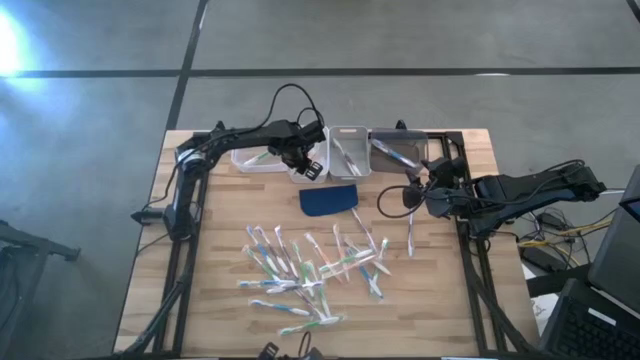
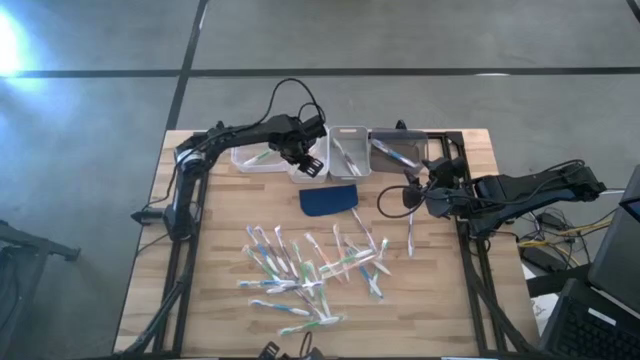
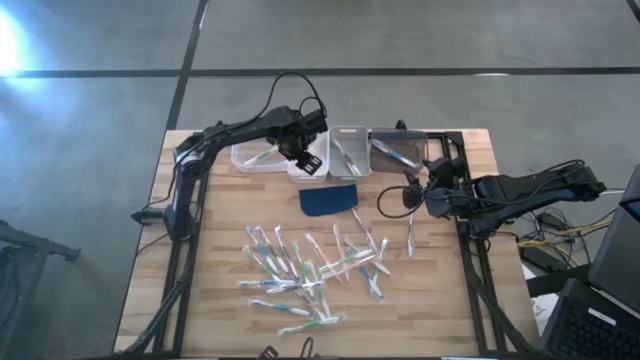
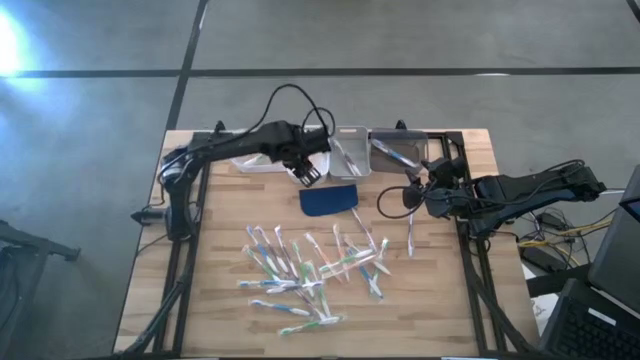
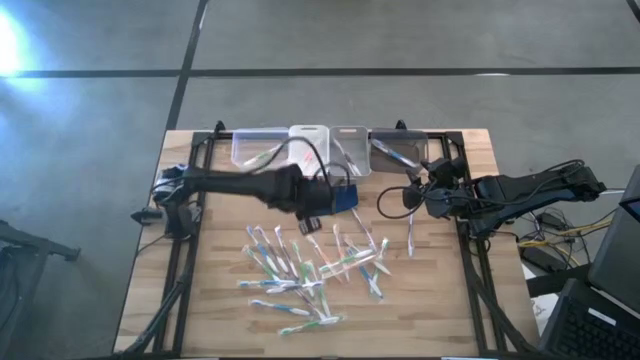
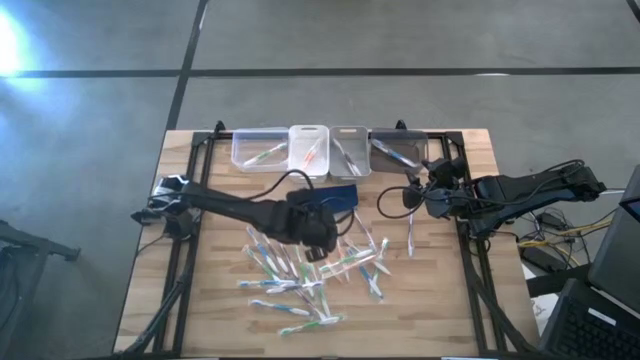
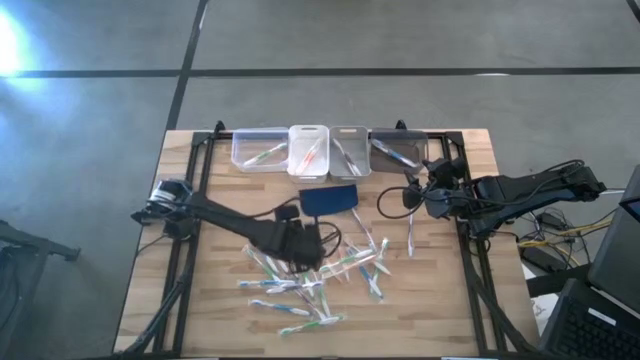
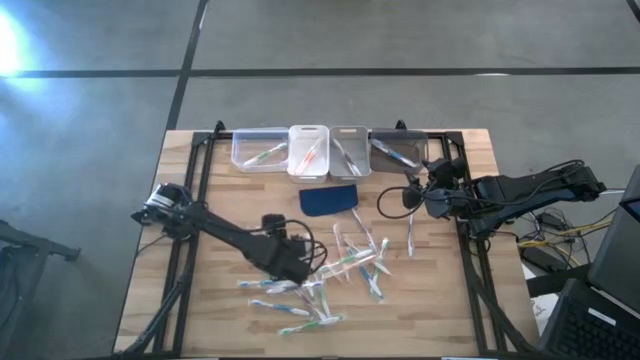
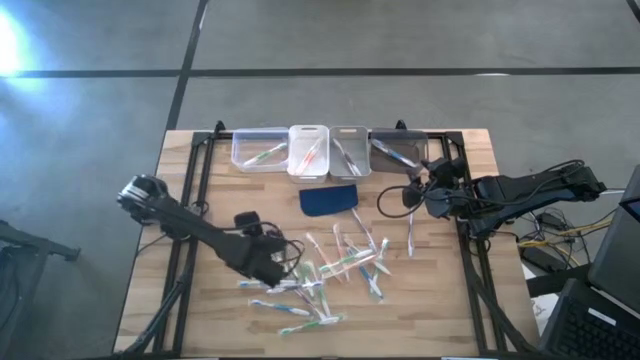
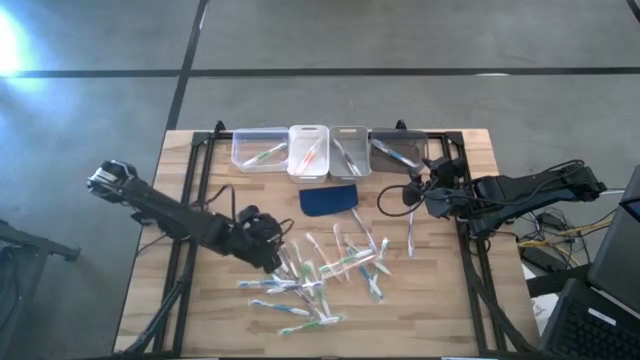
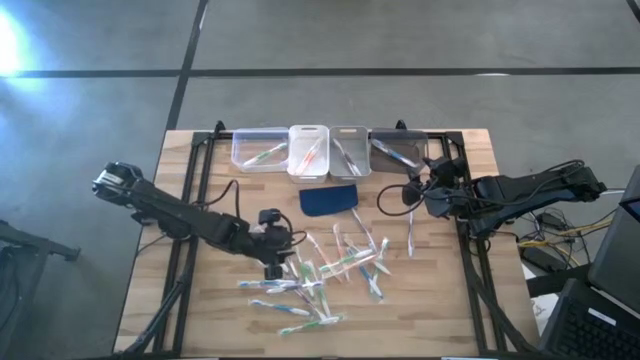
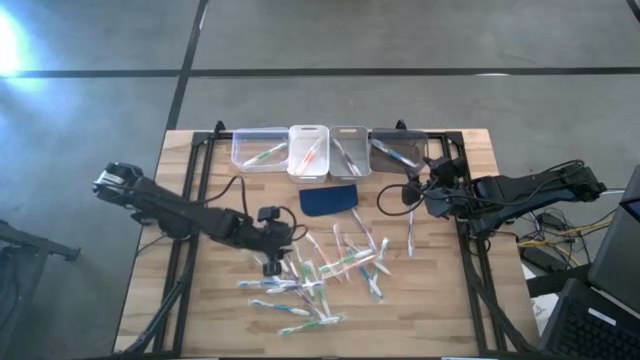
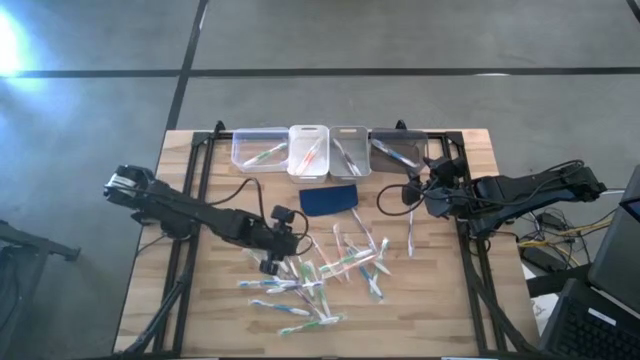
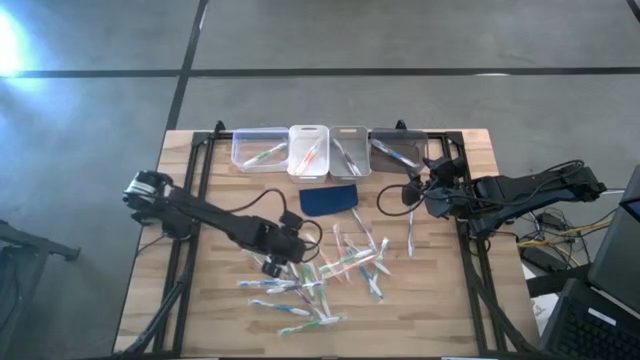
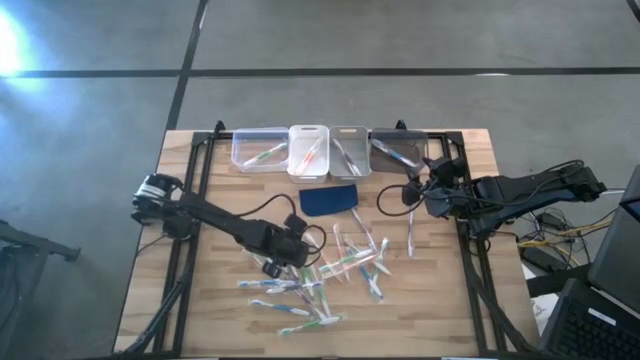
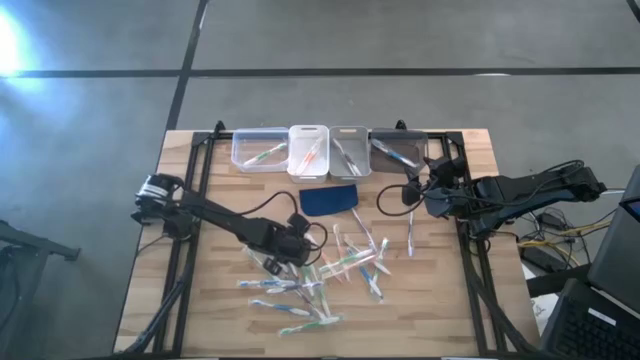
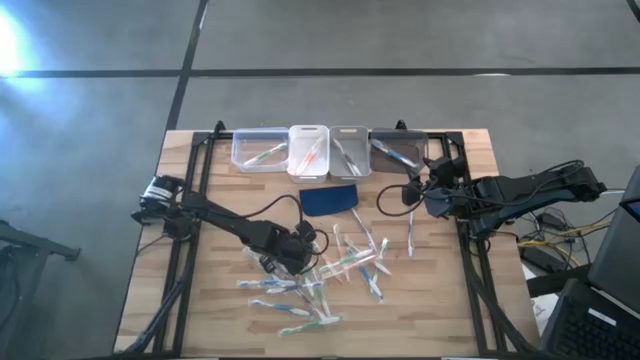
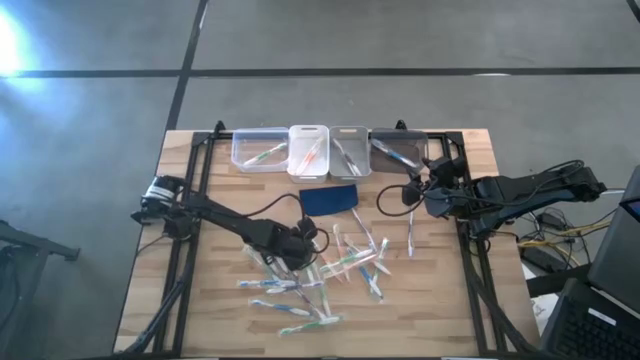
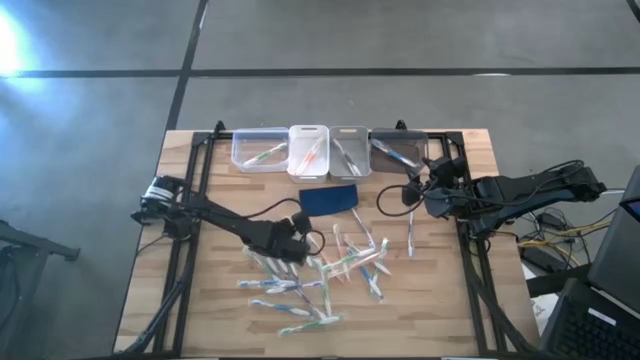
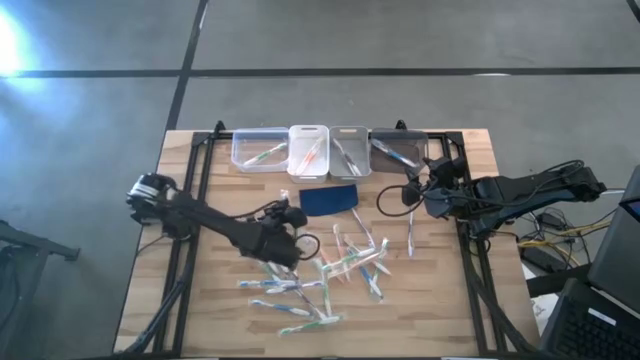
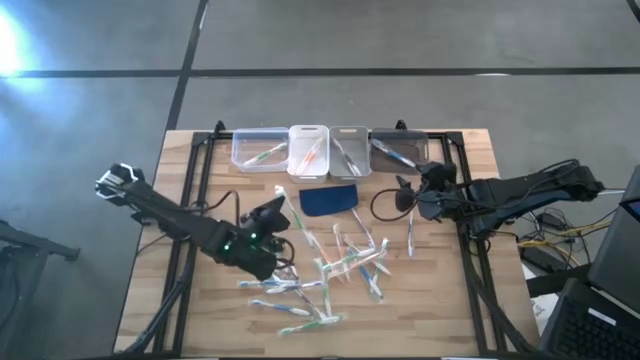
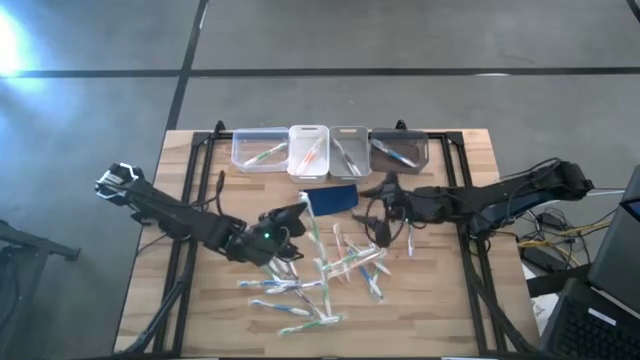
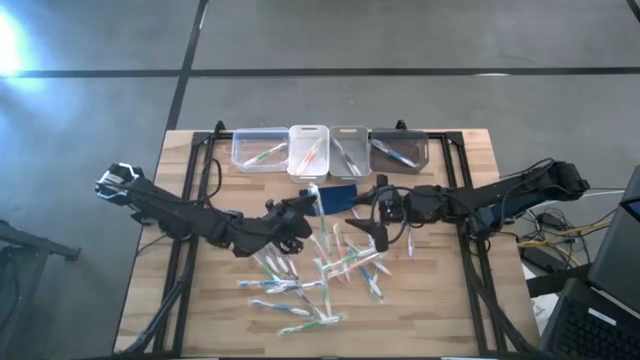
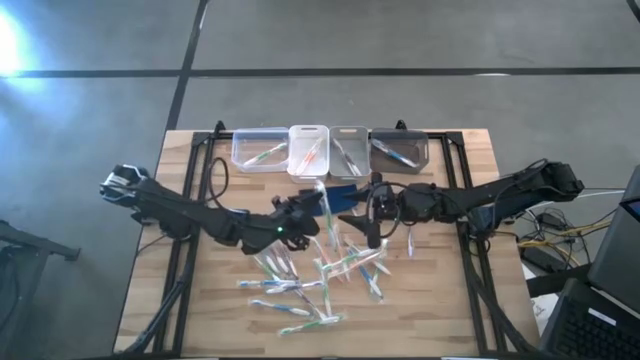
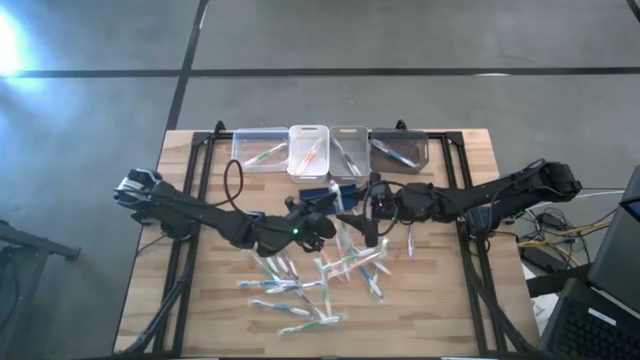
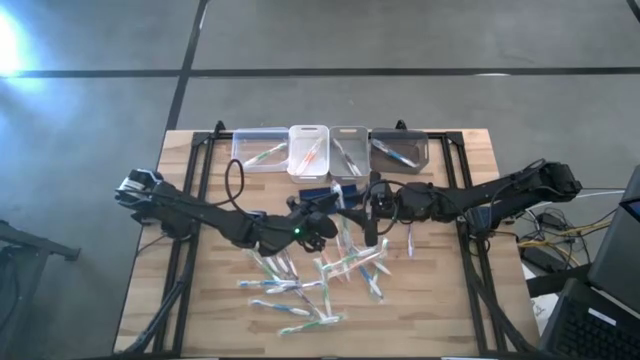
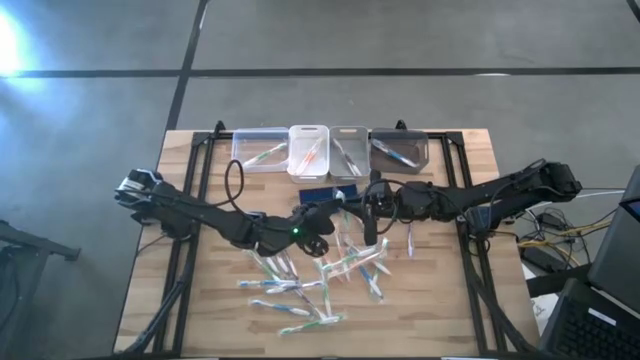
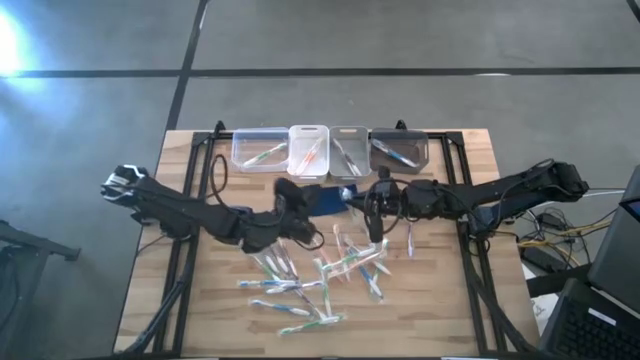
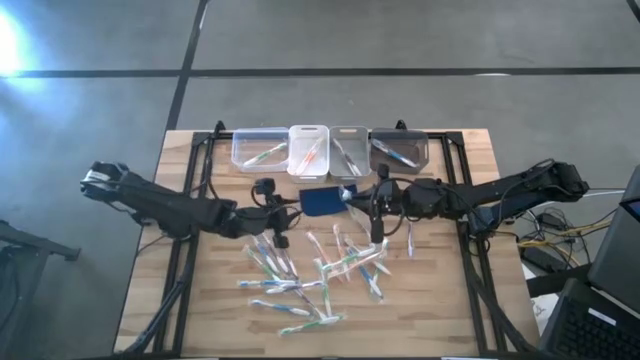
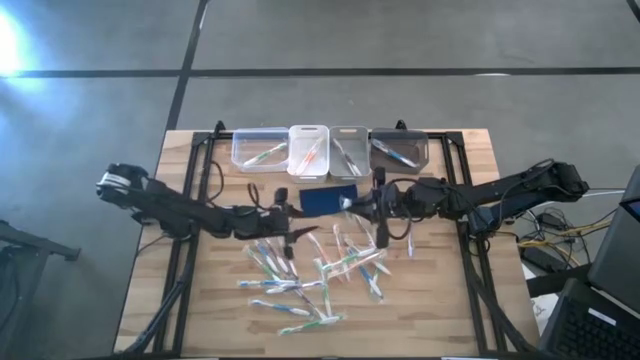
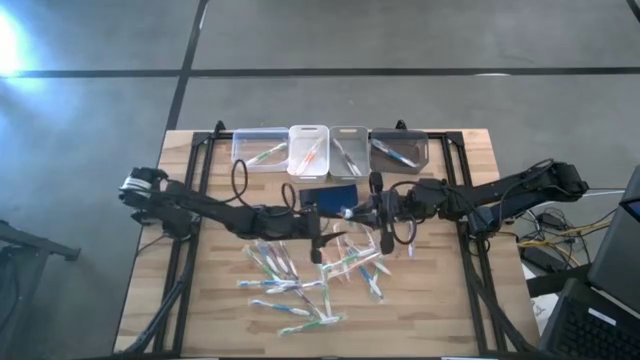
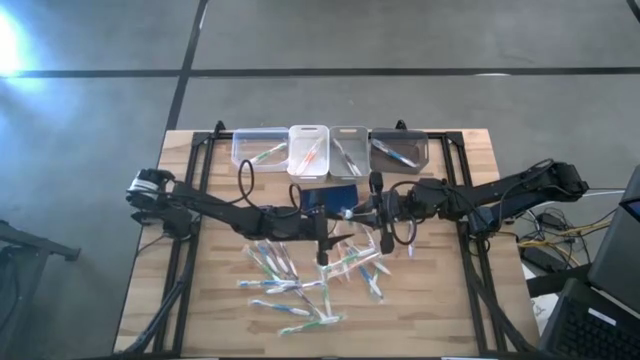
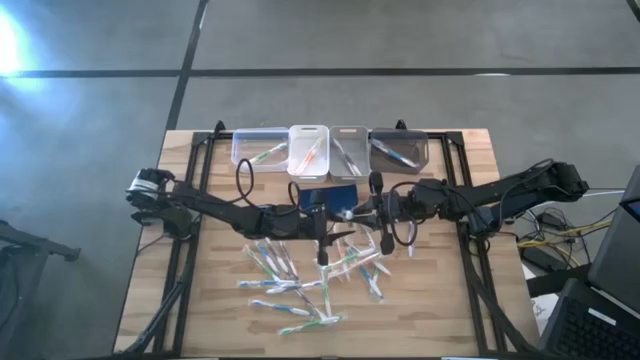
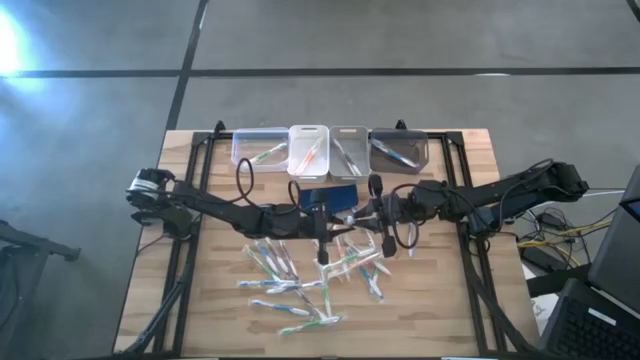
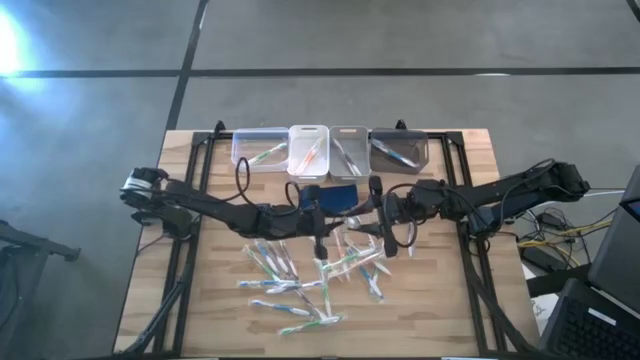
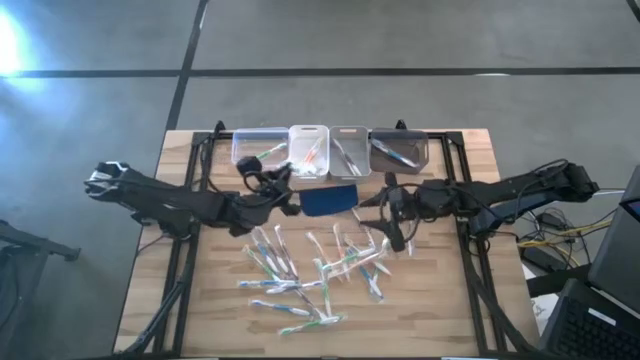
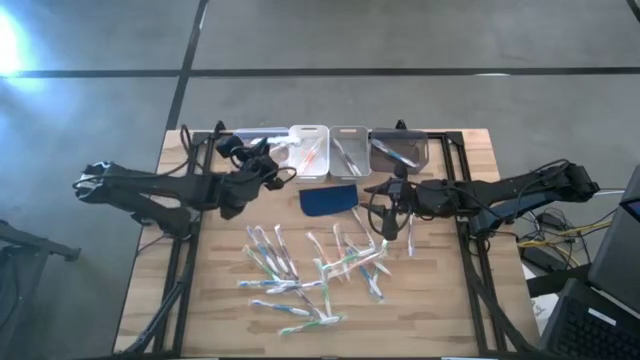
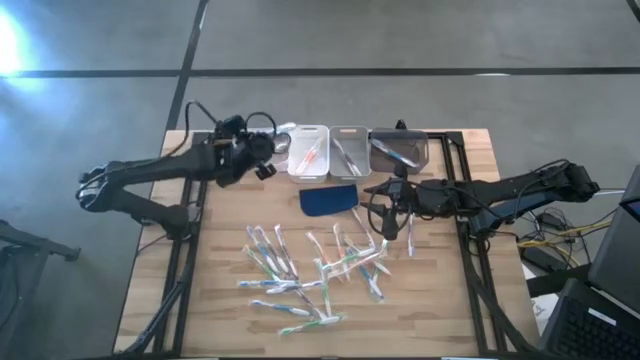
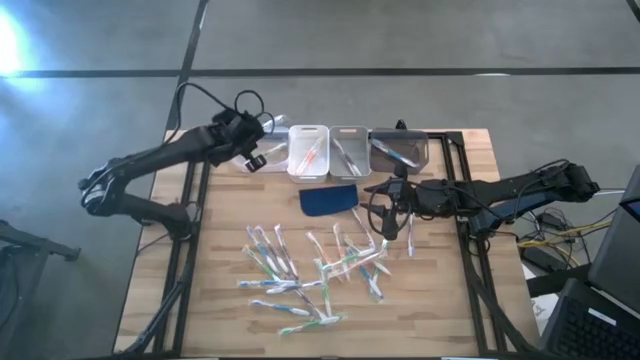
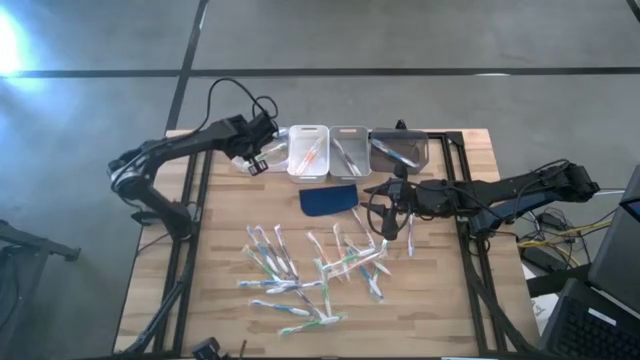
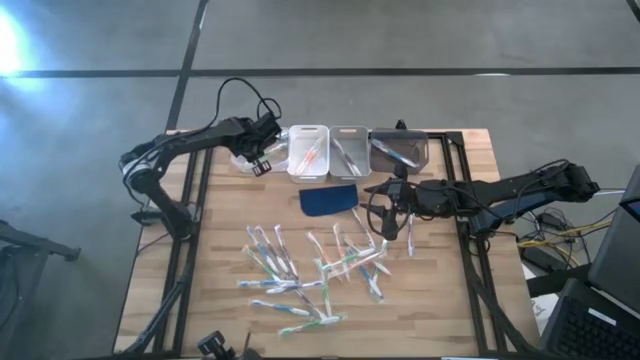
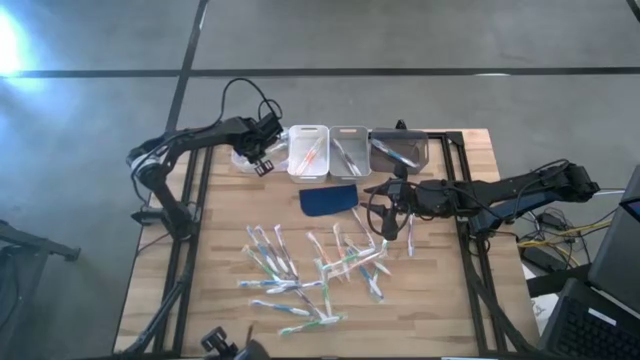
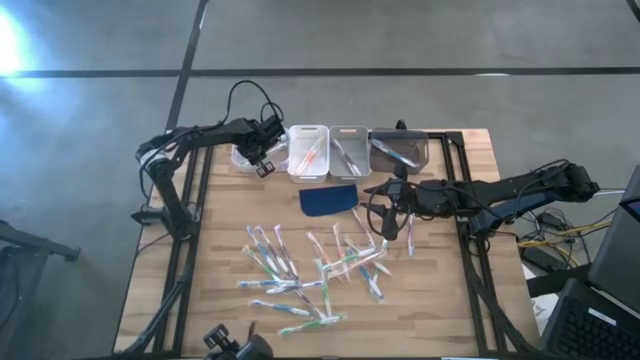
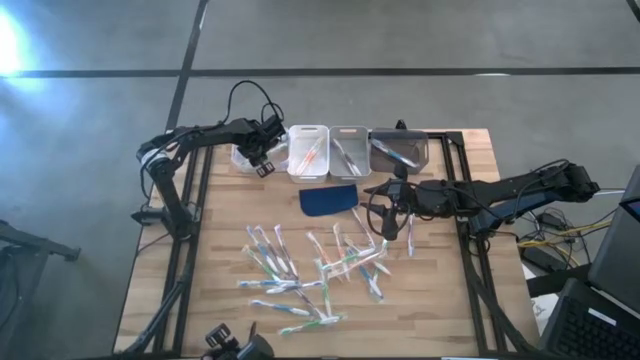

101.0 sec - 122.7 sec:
Task: Pick & Place Toothbrushes
Put the green toothbrush into the transparent bin
